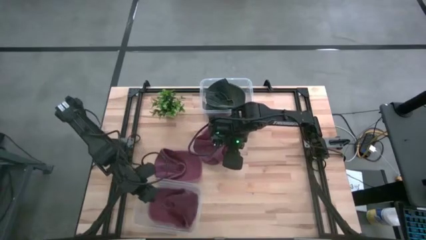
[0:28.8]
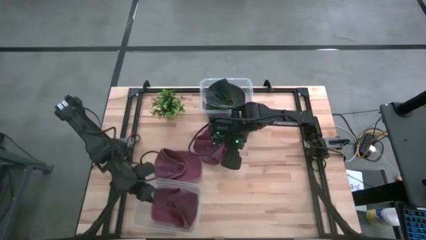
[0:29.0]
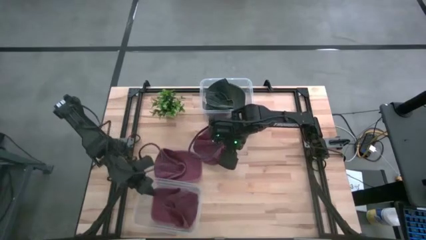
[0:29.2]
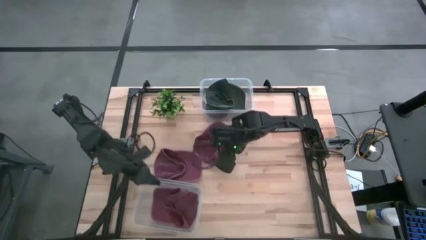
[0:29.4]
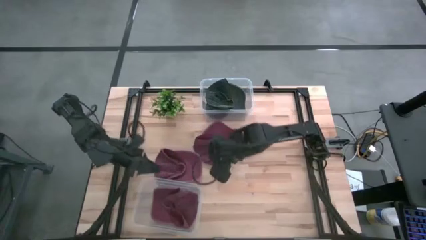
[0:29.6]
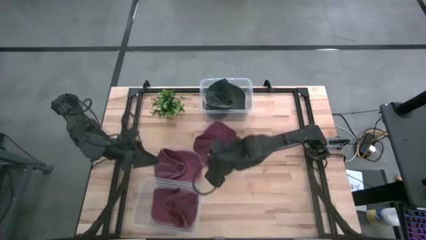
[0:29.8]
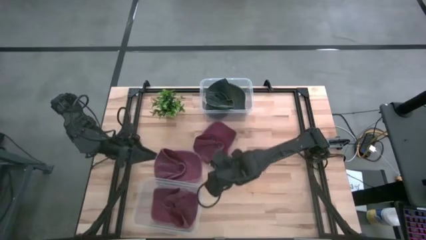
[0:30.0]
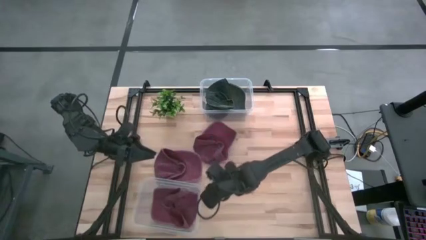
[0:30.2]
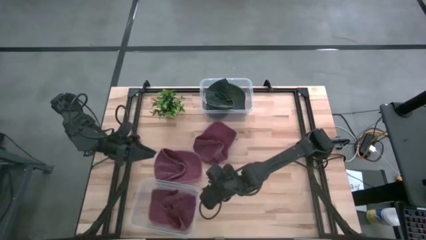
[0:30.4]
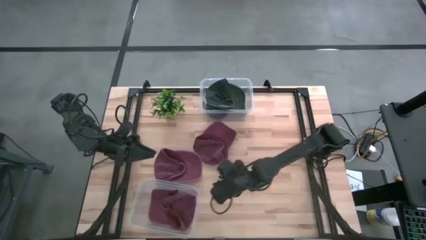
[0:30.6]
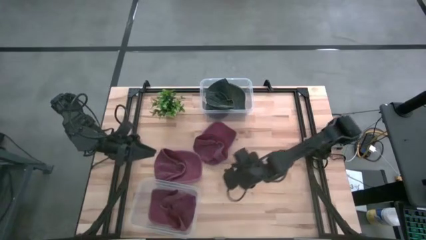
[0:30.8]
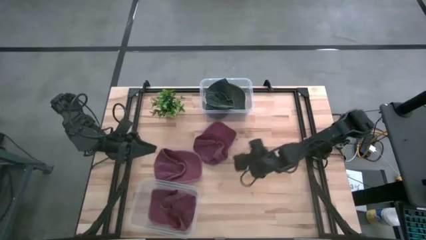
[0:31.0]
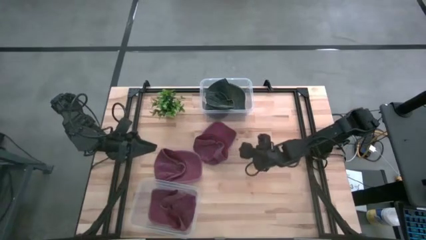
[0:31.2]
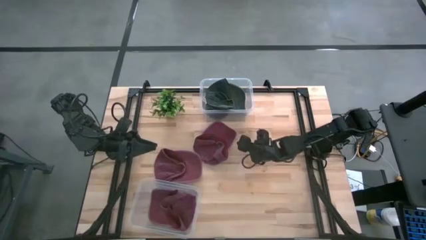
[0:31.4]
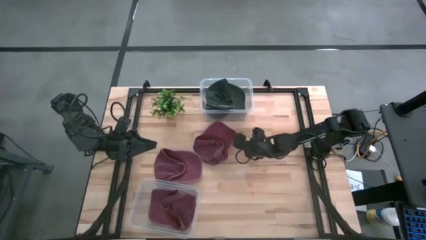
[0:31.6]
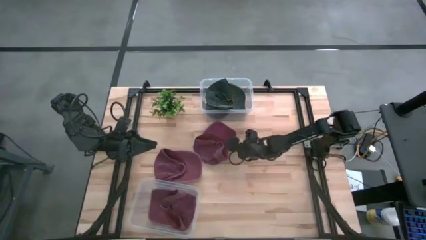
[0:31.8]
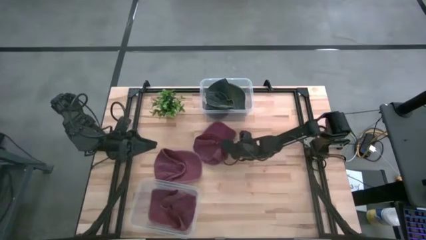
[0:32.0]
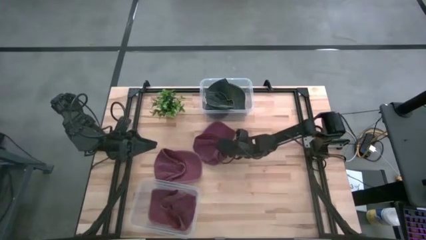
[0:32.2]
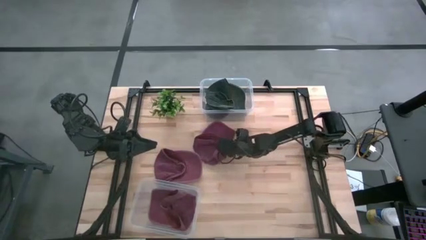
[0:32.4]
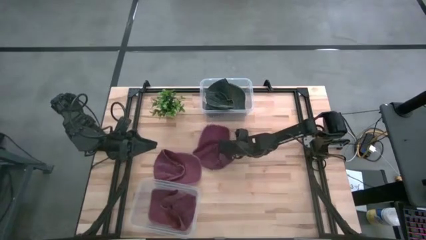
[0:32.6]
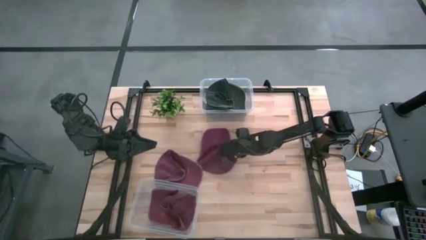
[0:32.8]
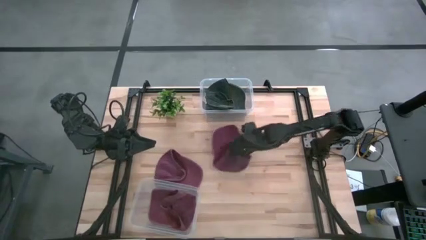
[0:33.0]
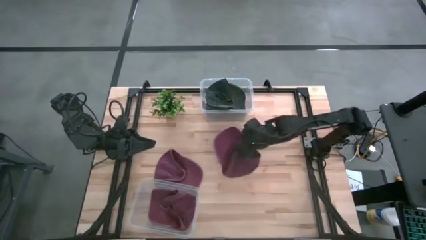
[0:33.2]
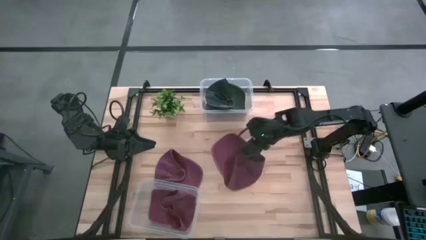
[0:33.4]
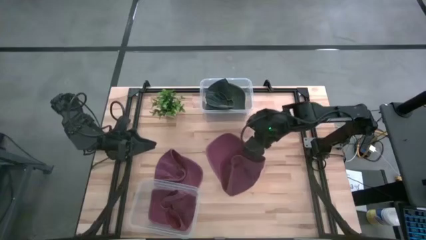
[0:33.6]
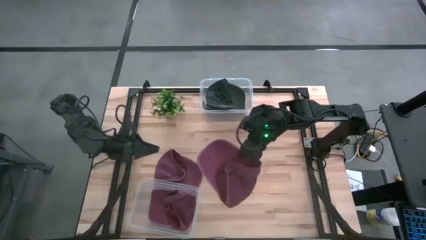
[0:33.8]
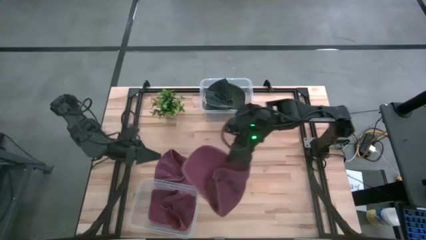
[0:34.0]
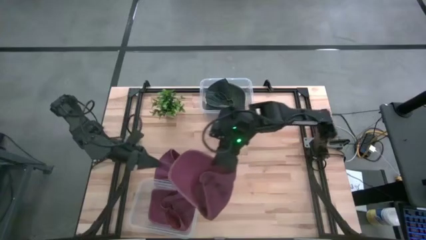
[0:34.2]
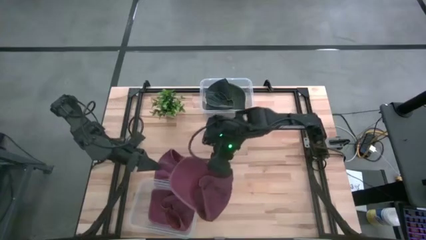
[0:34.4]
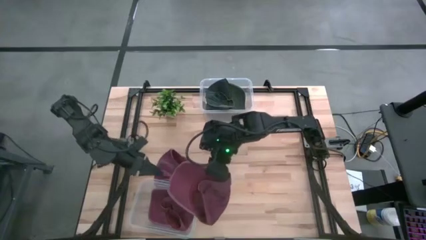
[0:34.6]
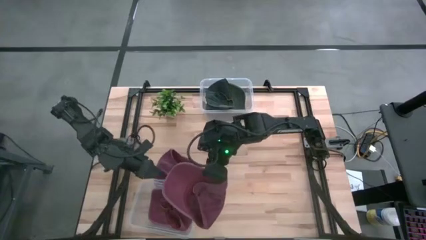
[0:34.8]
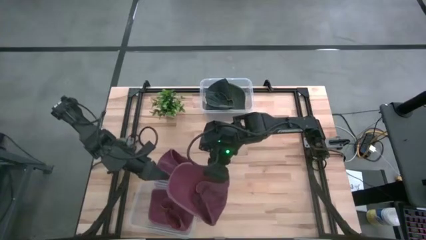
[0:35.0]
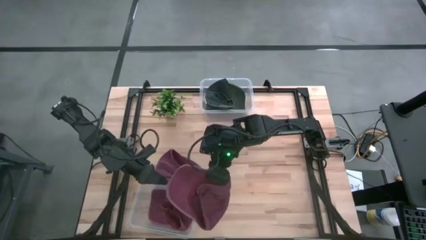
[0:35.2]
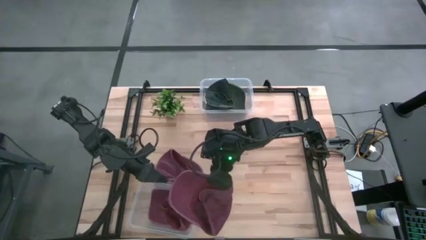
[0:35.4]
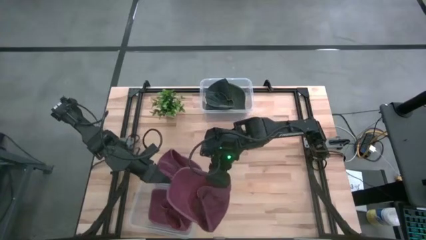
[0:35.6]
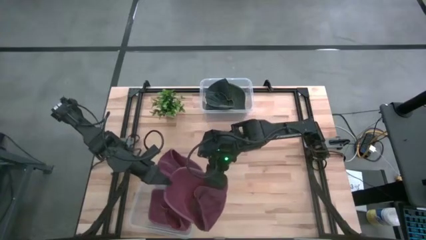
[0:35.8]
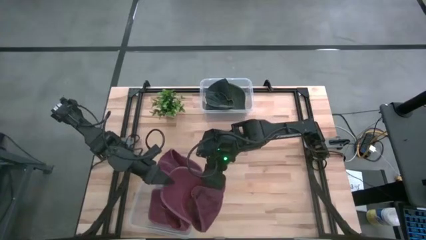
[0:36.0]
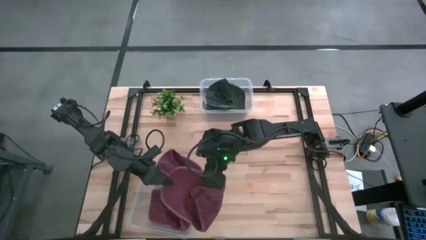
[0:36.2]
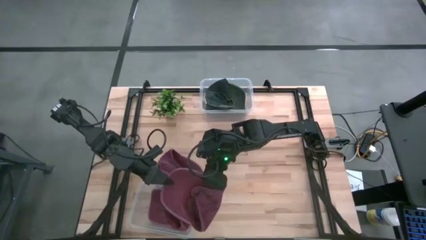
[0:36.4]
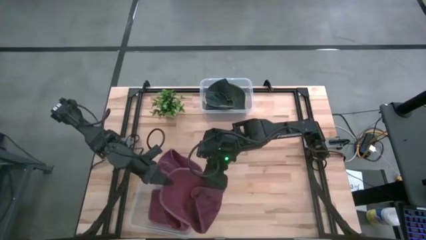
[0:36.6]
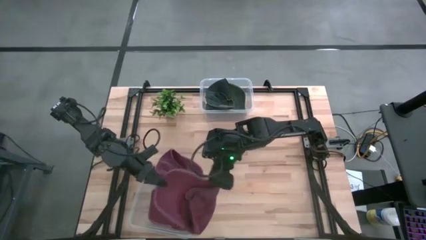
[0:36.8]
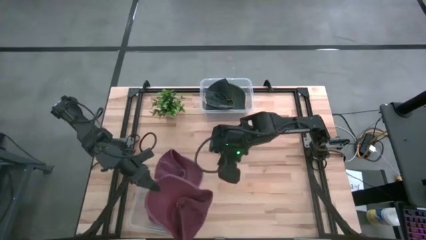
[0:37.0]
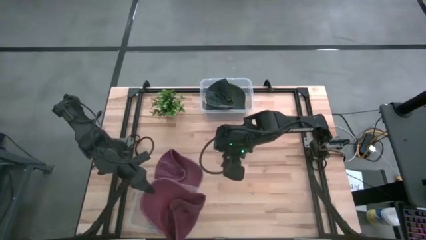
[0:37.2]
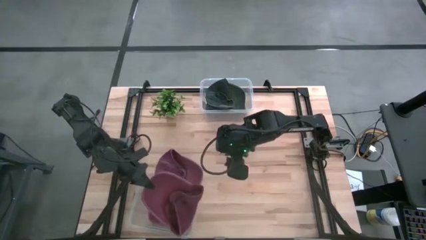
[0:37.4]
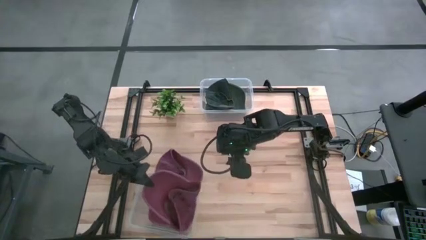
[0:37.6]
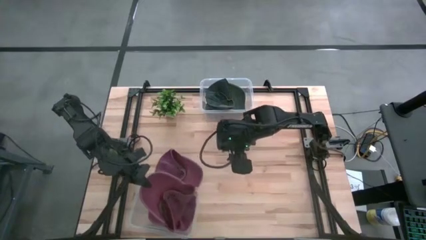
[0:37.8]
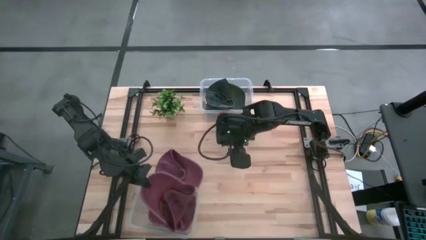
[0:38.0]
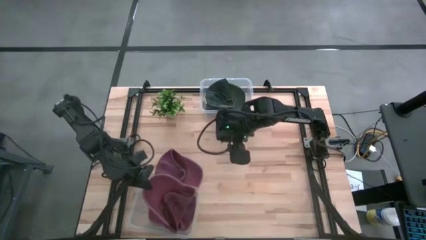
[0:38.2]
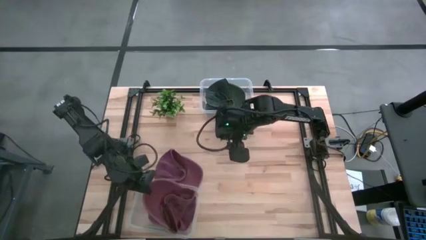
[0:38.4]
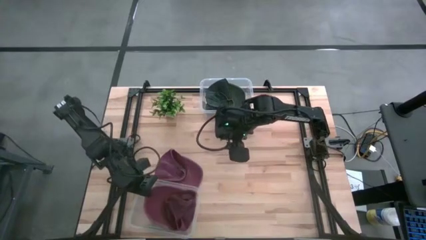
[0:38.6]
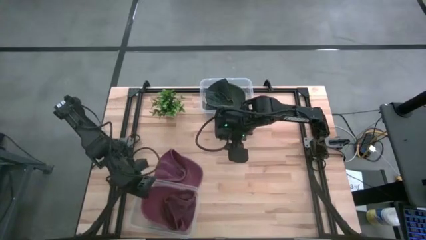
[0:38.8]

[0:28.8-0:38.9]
Task: Pick & Place hat
Put the top red cap into the bottom transparent bin

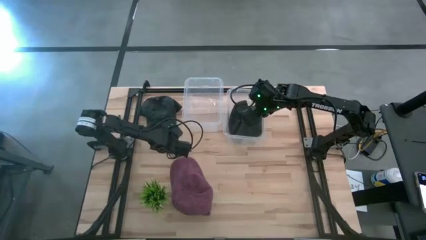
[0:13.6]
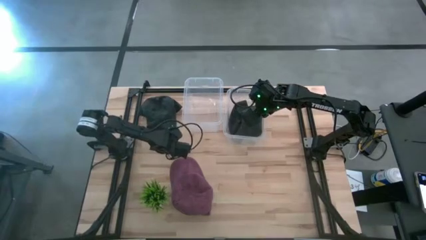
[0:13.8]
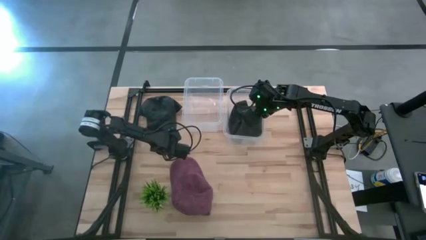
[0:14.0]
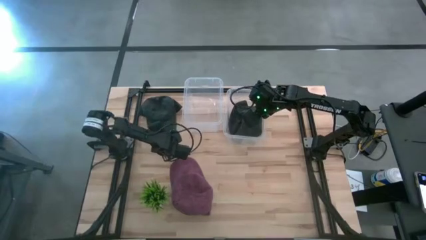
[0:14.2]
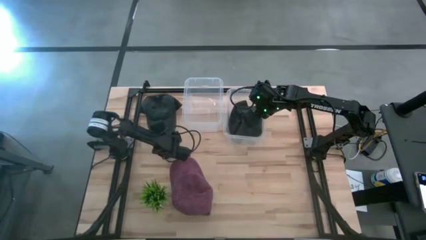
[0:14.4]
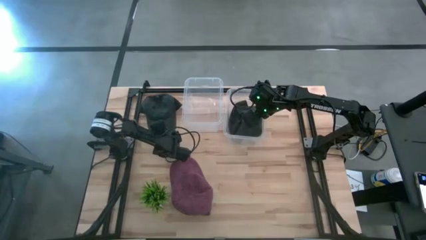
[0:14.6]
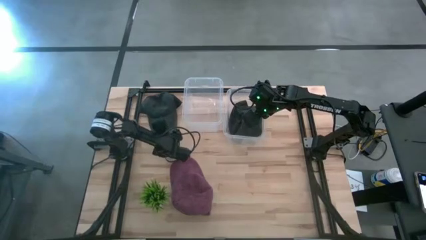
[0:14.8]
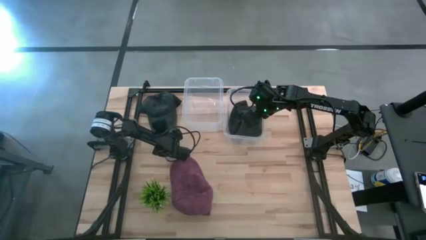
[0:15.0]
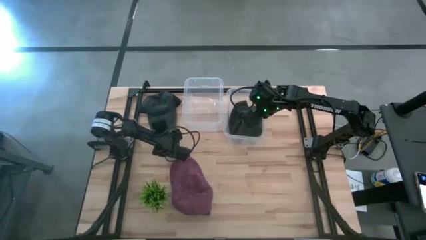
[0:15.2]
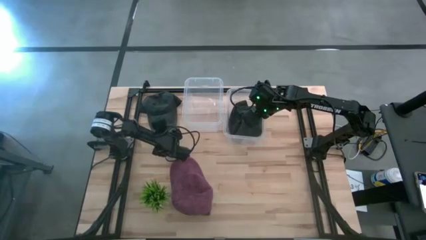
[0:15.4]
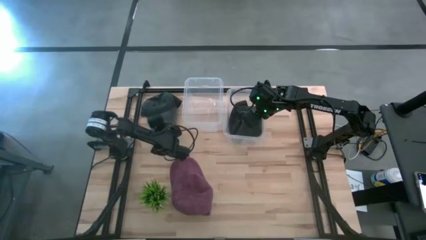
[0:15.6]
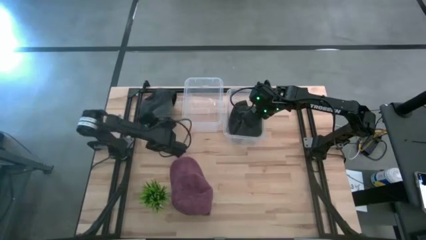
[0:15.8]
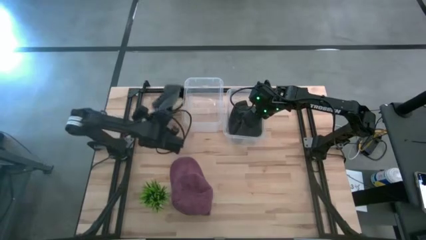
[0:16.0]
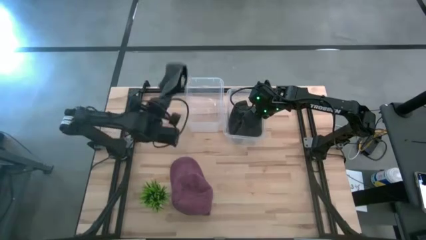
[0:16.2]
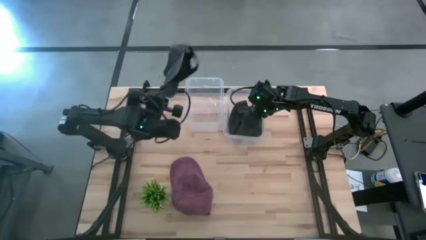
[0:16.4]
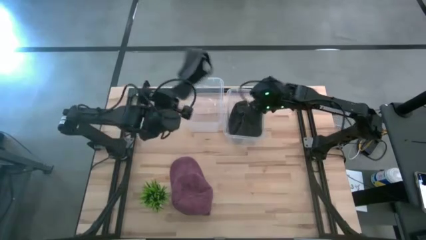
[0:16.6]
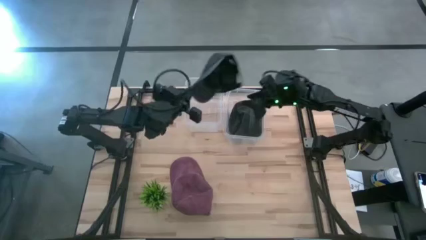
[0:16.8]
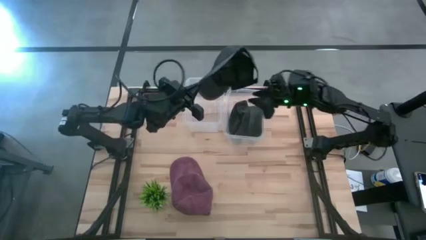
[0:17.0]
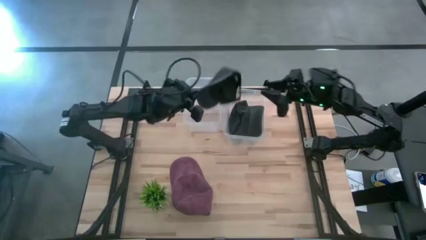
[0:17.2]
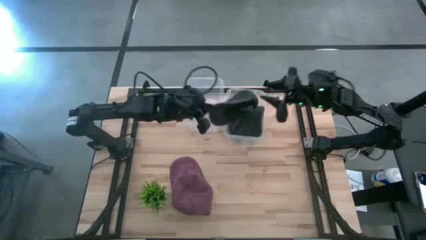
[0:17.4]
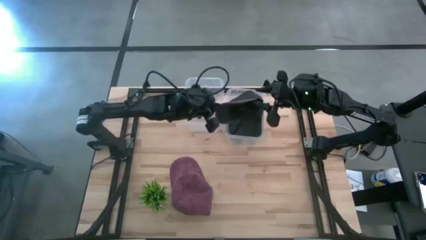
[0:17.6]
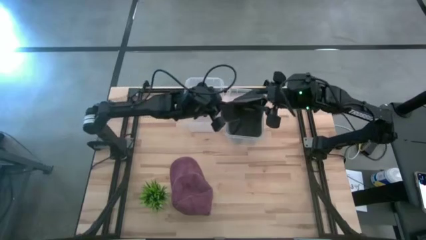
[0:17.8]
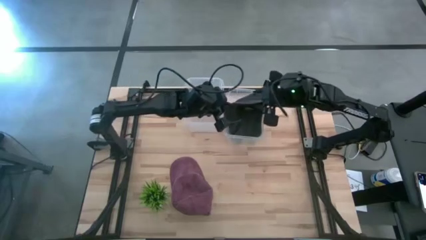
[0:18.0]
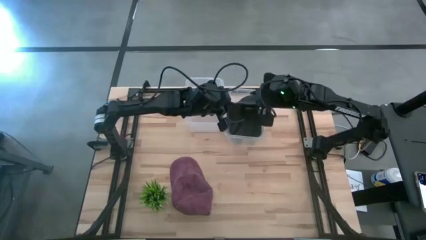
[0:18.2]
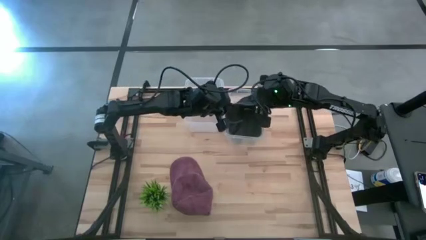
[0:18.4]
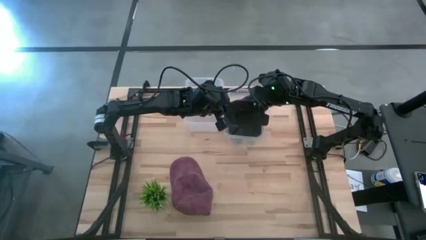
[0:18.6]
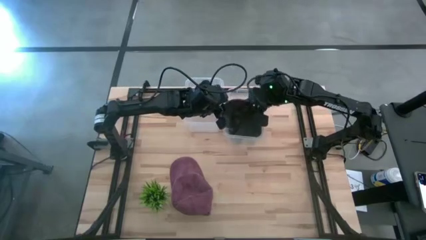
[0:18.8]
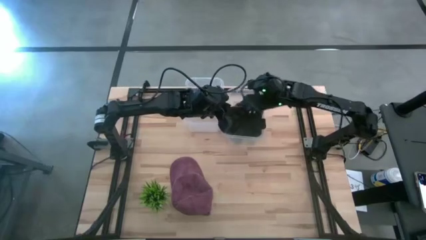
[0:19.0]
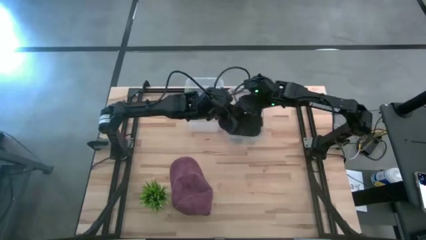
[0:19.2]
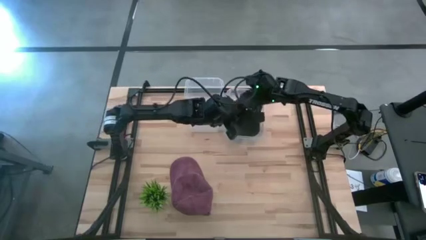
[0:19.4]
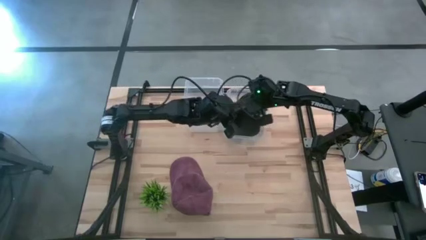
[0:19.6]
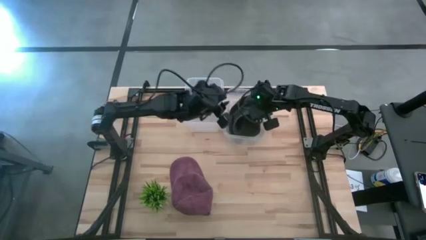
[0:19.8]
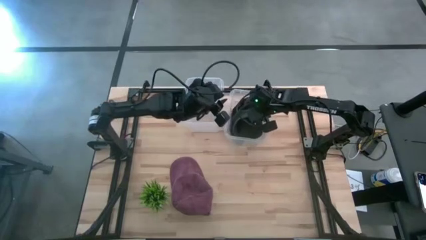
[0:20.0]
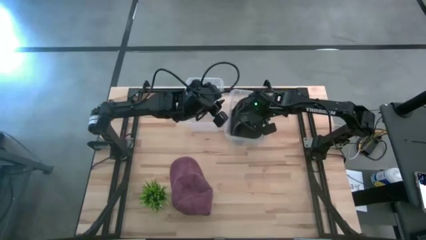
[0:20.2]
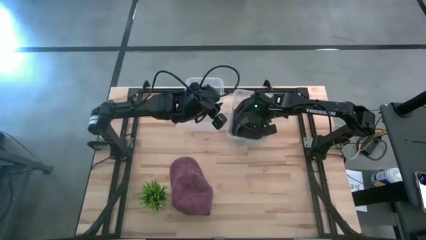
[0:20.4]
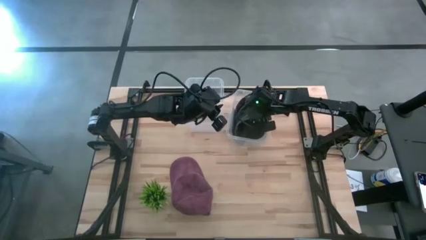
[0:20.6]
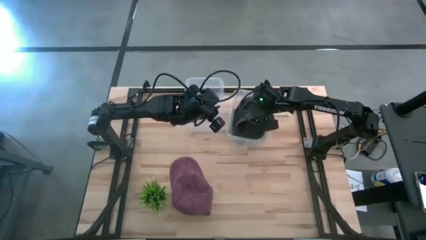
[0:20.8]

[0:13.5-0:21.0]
Task: Pick & Place hat
Put the black cap into the right transparent bin
